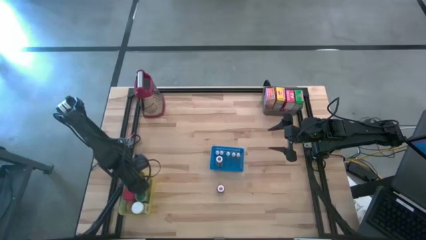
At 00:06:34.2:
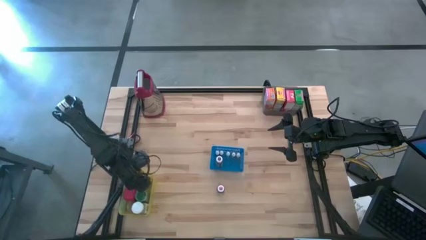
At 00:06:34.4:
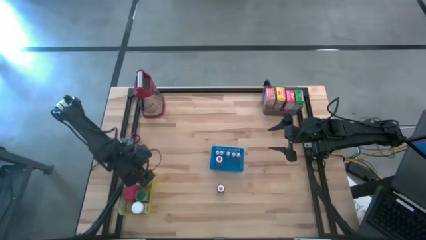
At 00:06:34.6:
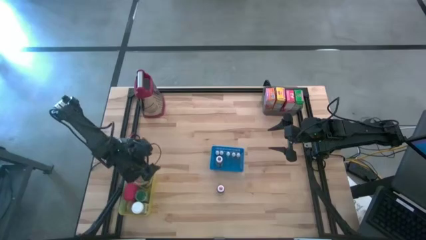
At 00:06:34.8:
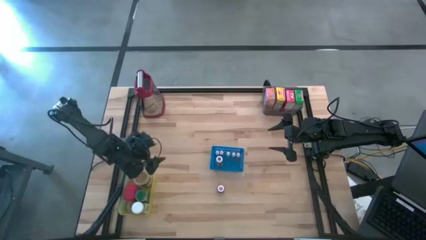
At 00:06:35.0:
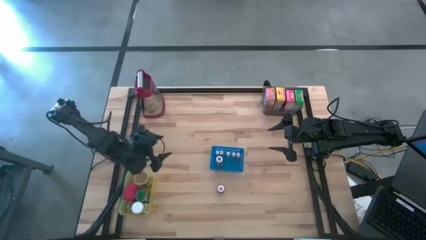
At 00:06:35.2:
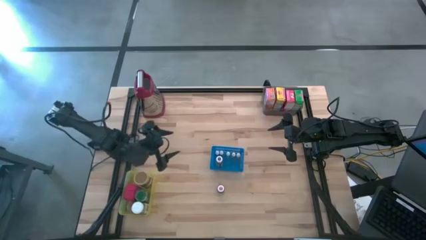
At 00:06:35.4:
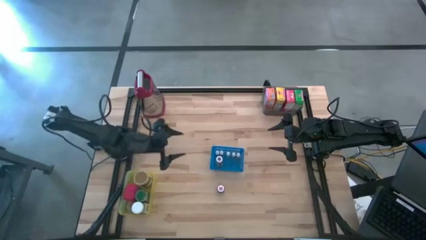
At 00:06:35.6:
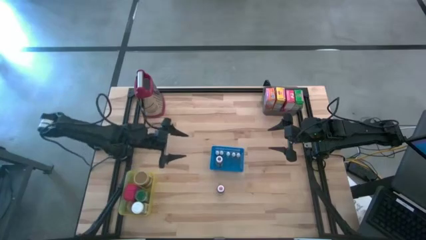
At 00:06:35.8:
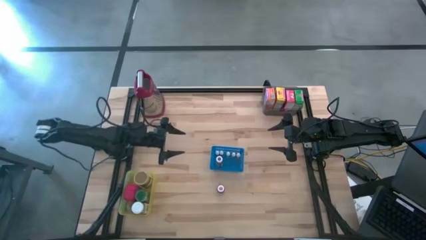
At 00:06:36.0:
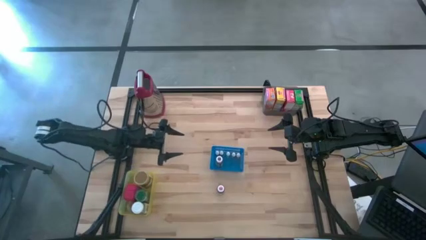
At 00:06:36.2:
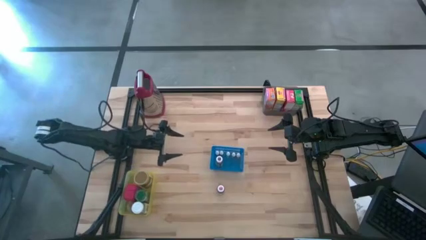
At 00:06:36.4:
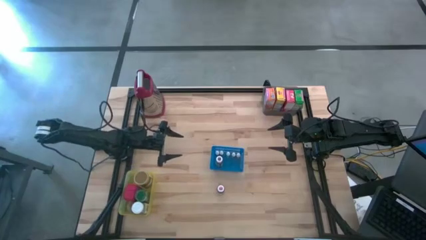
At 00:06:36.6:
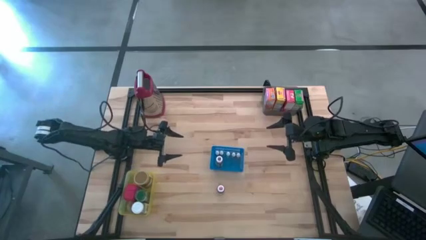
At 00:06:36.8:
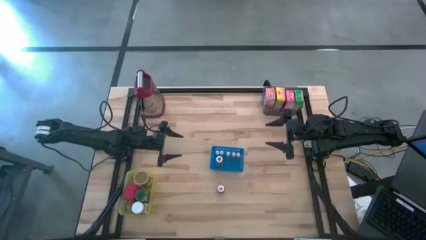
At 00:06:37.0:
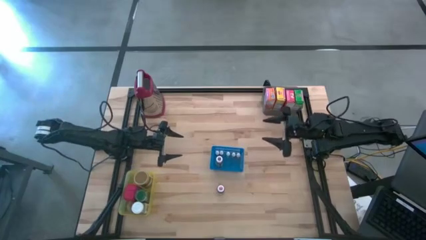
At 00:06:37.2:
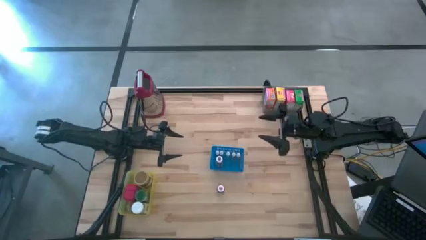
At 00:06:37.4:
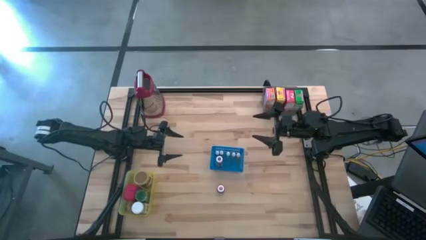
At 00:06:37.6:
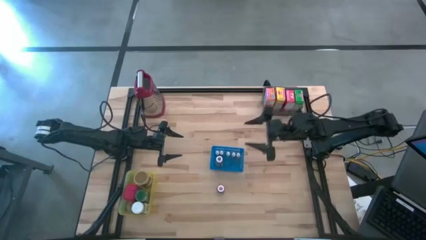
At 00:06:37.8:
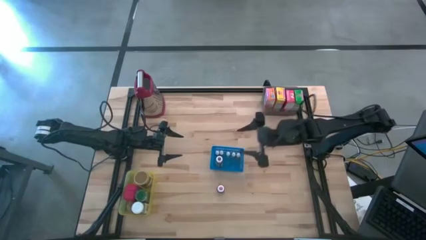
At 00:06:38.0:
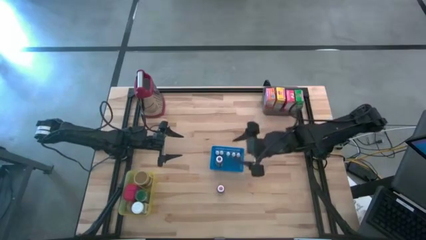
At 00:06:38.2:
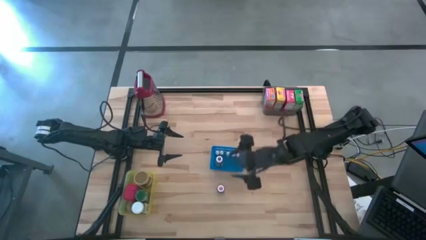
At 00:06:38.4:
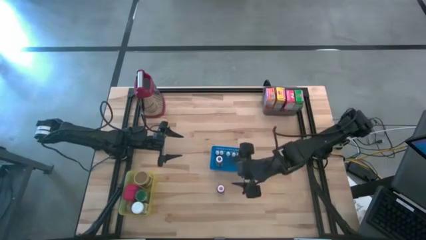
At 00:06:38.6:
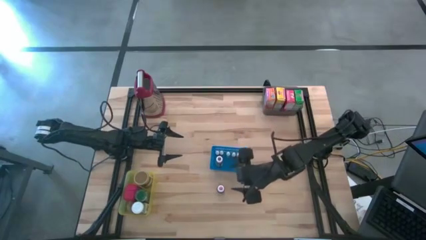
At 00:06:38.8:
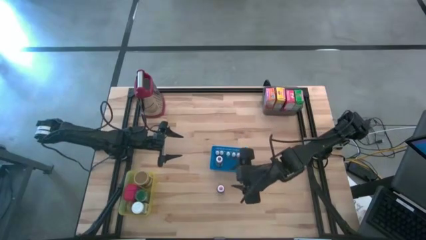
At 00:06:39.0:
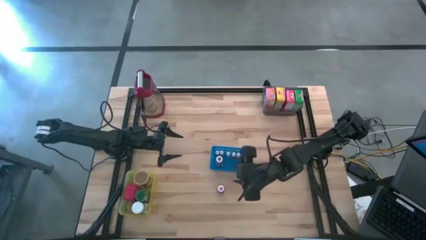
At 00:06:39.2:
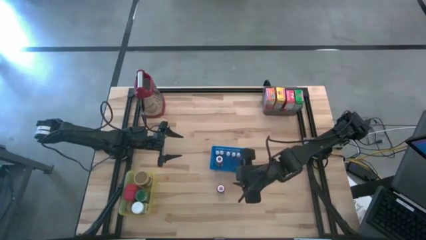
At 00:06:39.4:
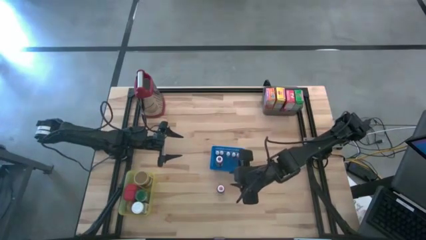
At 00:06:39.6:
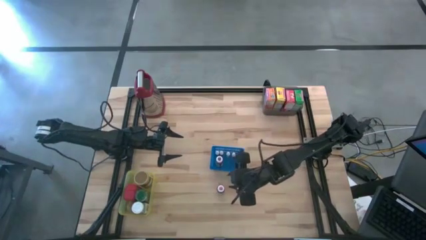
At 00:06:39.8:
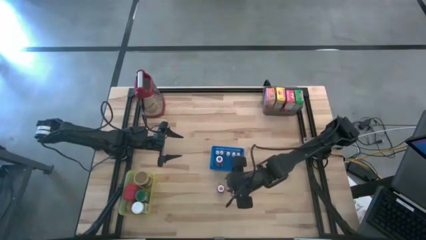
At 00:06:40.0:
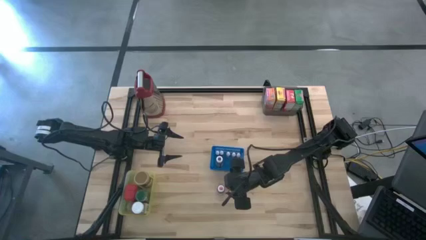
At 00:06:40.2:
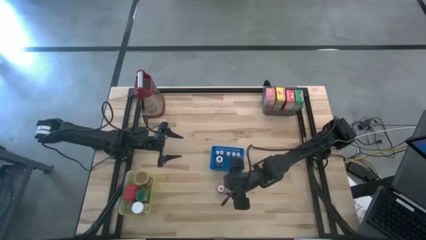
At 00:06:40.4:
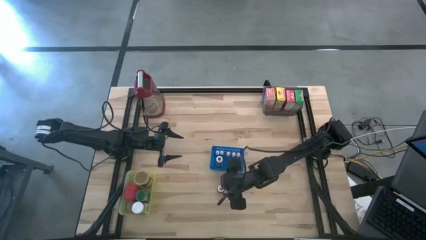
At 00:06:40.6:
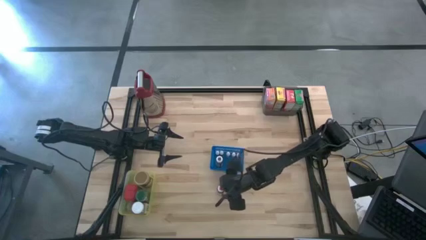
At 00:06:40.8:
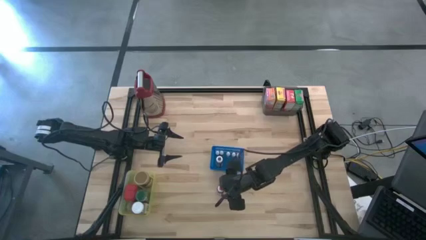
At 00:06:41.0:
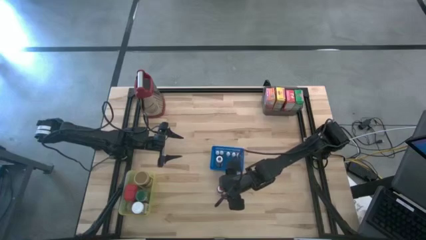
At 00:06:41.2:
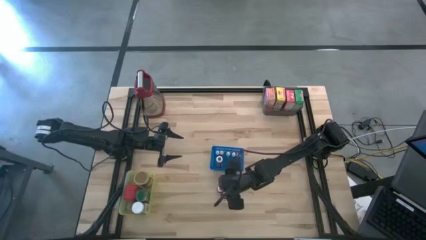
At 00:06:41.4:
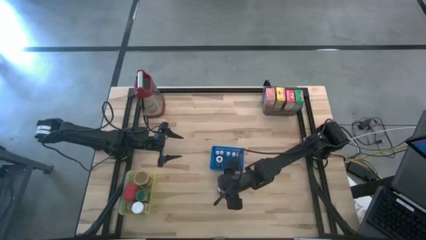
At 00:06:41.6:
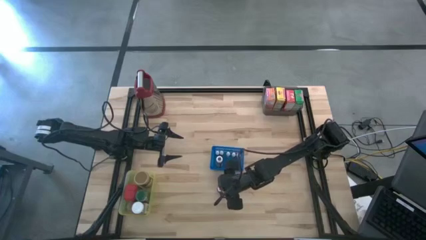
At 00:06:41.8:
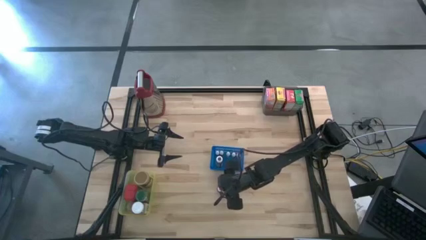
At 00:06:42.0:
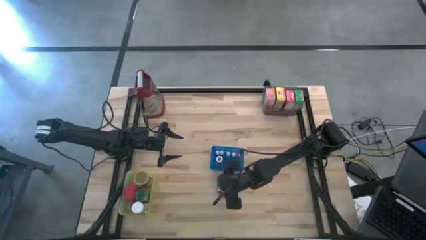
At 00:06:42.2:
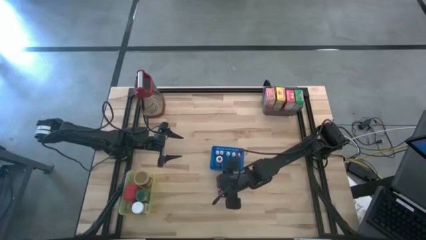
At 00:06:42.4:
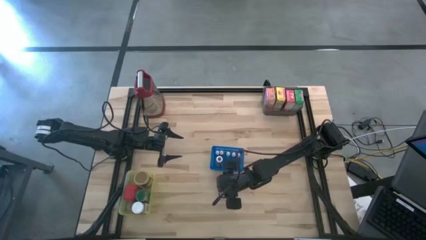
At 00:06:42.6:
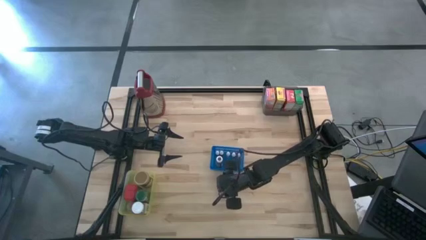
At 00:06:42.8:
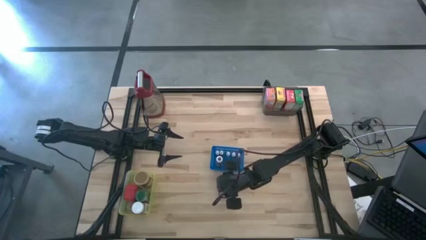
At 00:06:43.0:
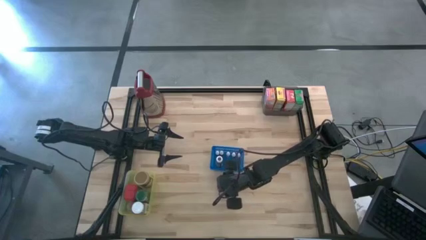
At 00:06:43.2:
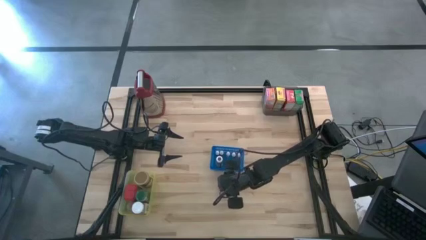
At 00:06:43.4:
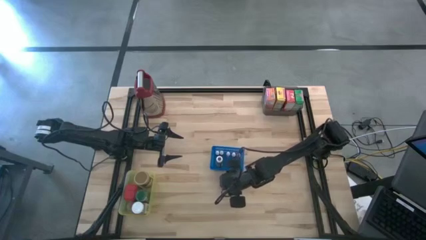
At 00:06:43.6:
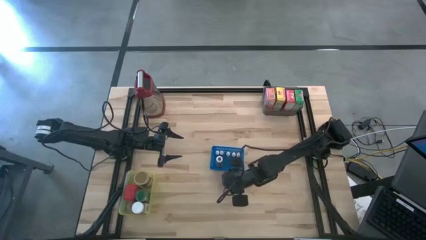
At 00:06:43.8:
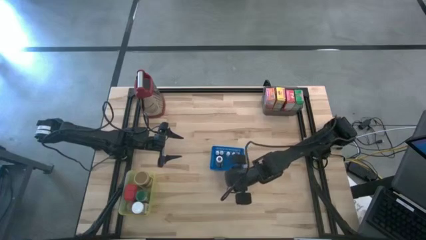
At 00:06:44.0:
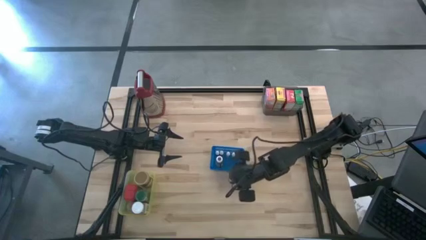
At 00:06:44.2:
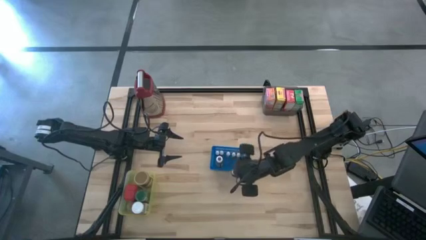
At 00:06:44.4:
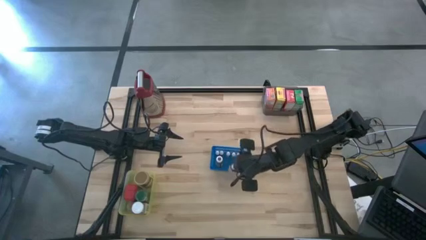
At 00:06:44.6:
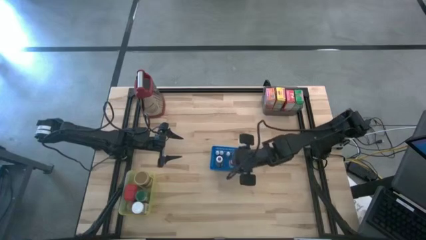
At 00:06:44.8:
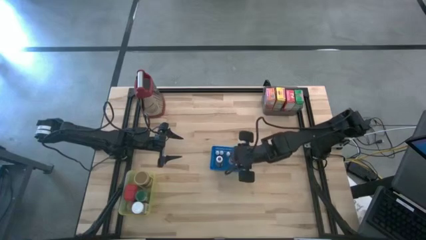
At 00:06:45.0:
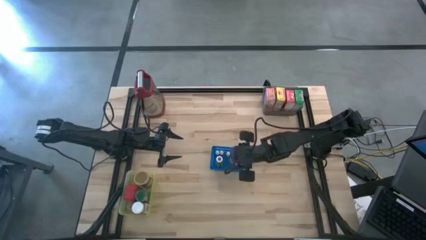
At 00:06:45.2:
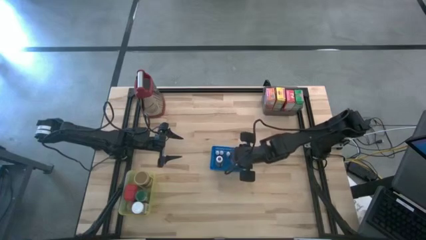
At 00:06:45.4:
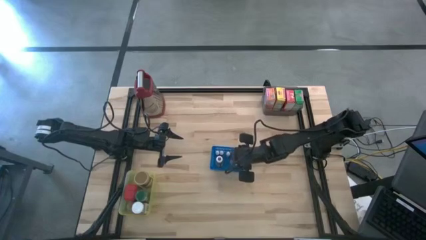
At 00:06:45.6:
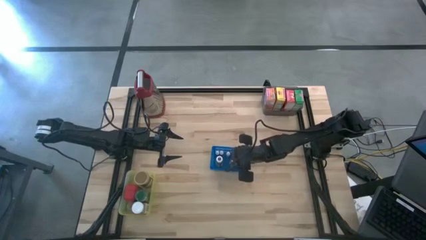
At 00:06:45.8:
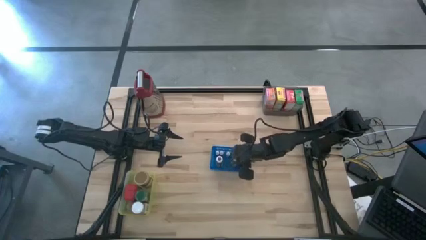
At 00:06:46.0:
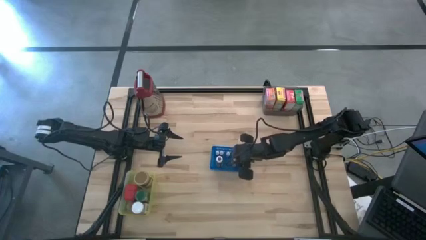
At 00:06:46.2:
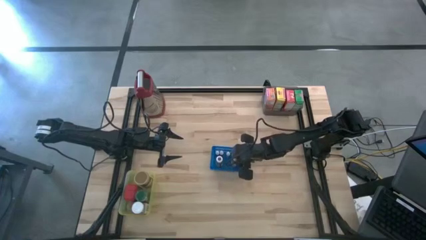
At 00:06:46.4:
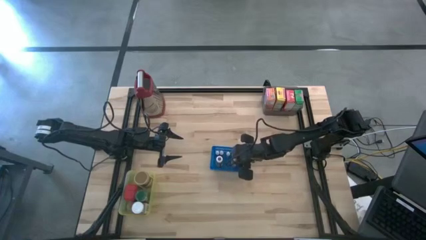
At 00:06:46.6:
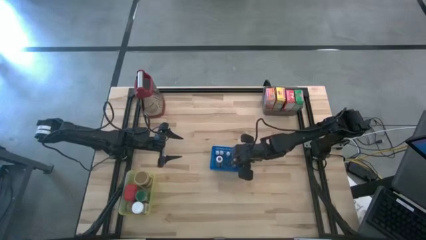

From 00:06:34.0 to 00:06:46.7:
Task: Pick & Place Kitchen Items
Put the large pink food coloring bottle into the blue bin
